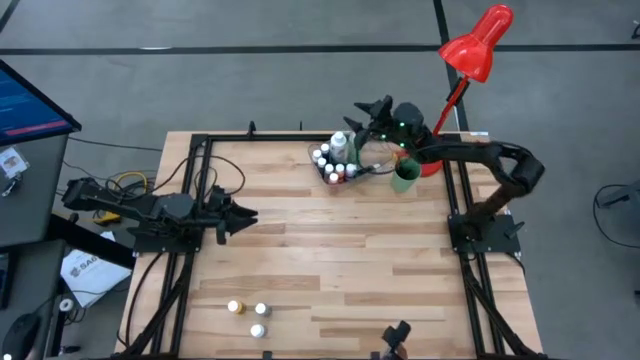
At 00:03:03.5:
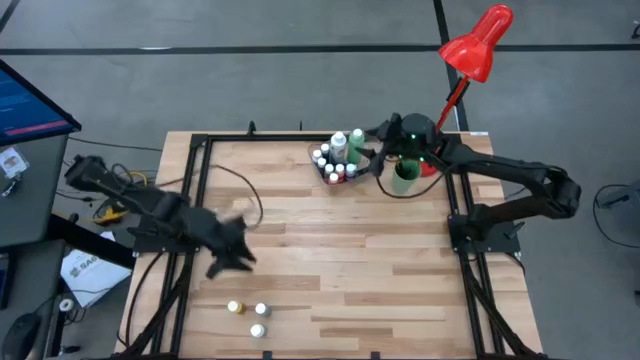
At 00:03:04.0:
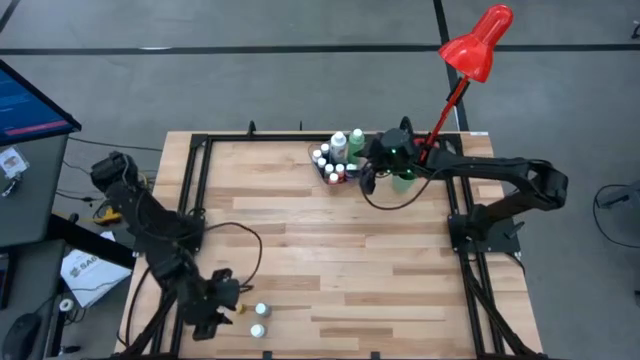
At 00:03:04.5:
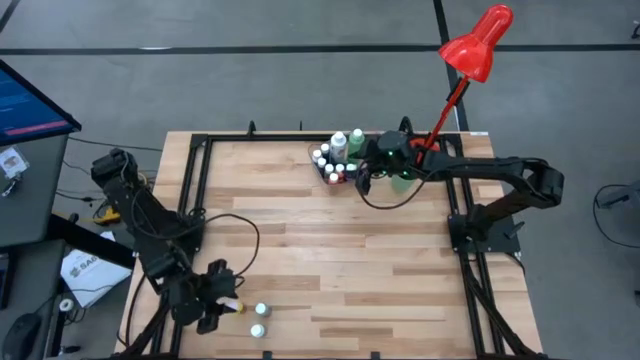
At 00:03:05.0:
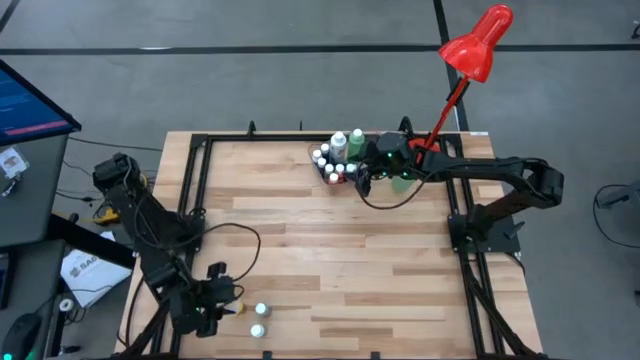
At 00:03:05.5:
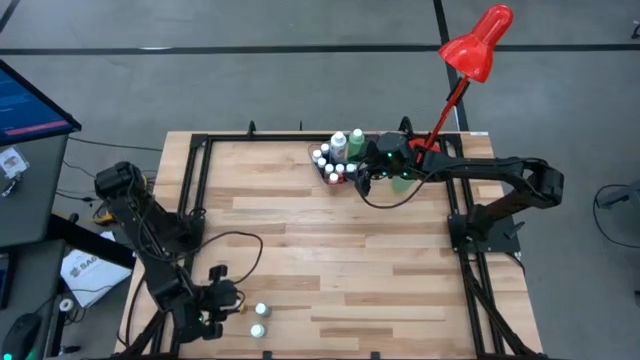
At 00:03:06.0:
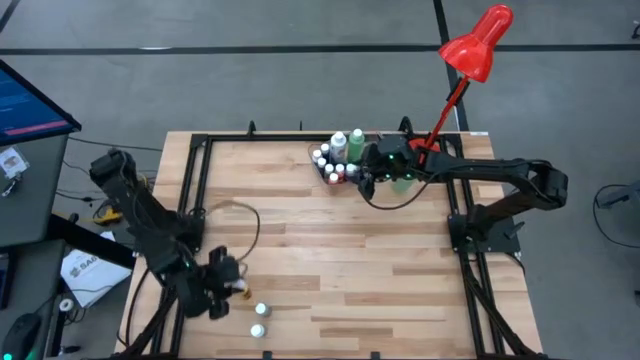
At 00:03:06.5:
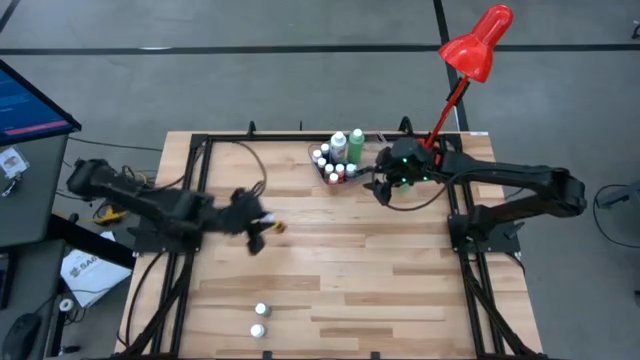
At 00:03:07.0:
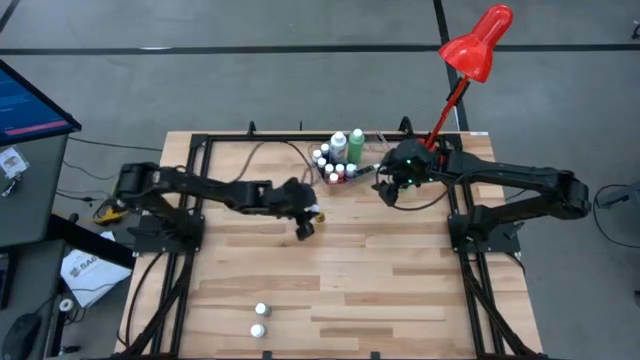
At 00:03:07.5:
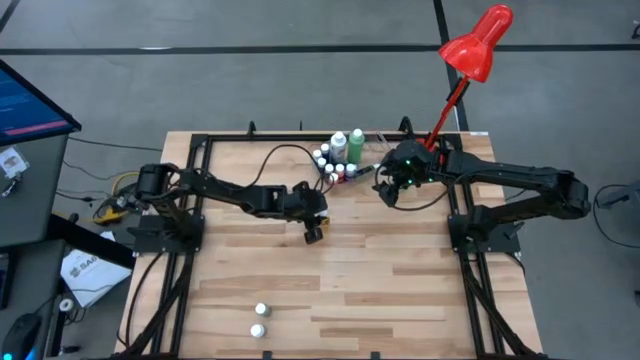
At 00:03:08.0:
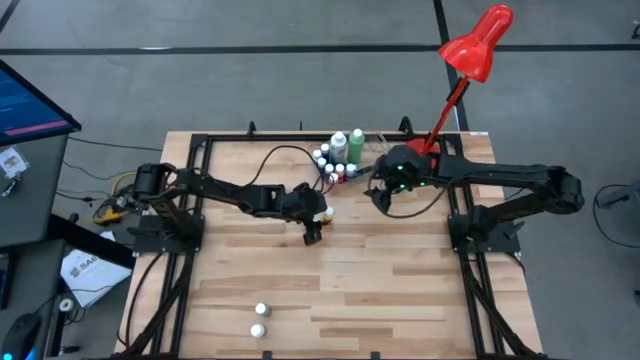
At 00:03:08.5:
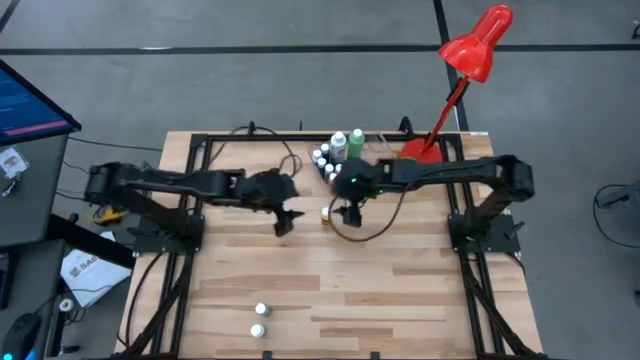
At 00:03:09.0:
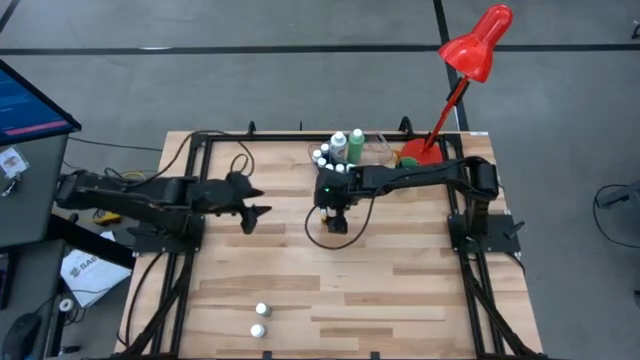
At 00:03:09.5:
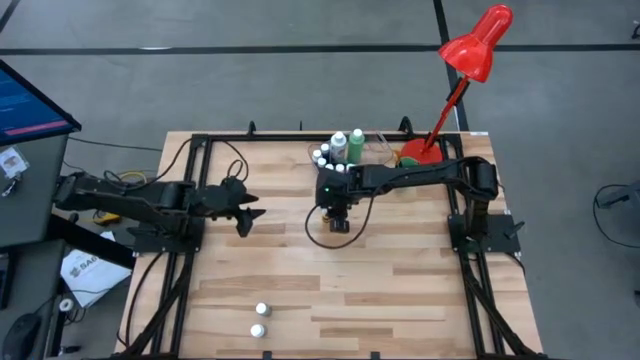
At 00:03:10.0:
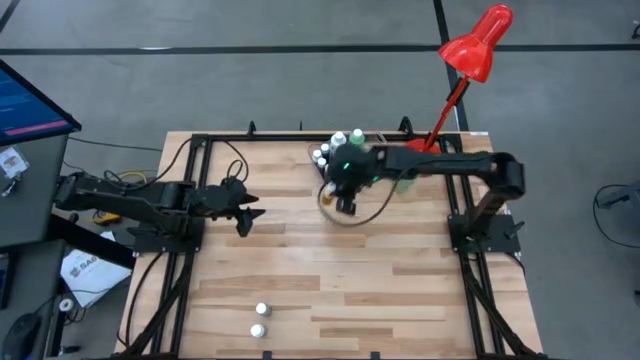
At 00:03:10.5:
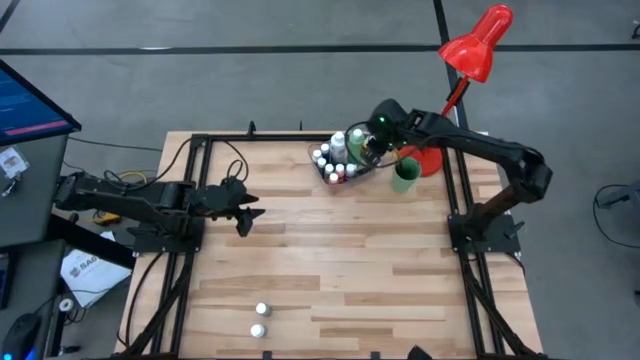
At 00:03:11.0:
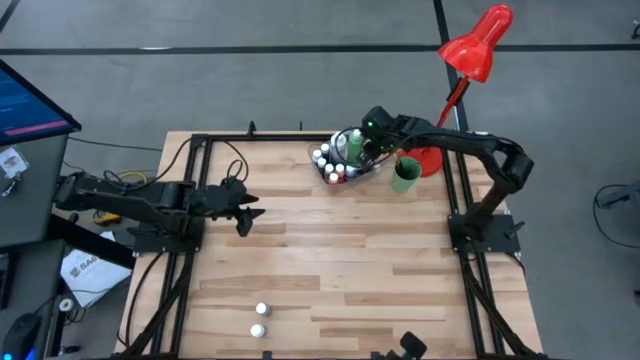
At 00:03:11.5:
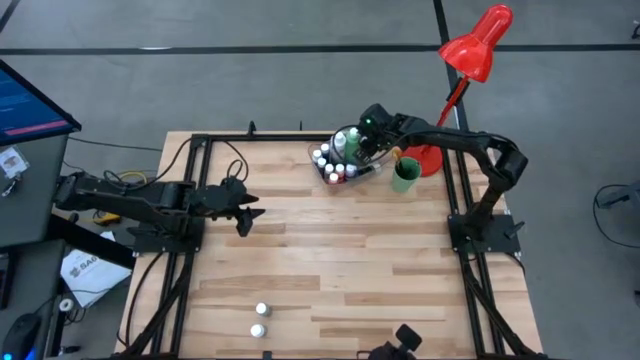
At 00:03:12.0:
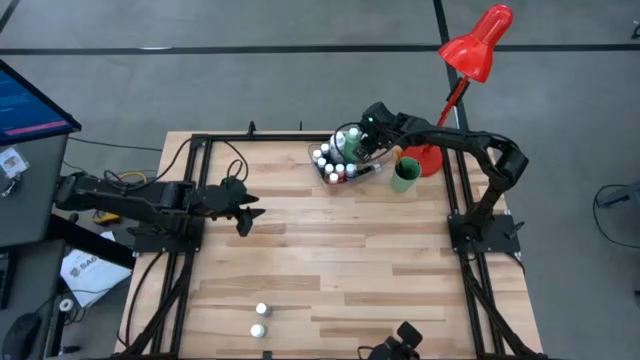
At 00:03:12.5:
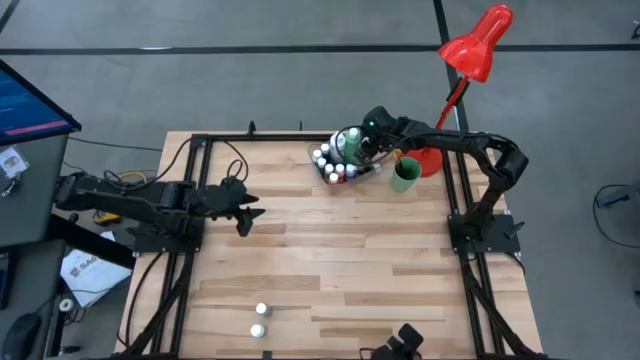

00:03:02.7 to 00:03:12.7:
Task: Pick & Place Paint Supplies
Put the small yellow paint bottle into the transparent bin

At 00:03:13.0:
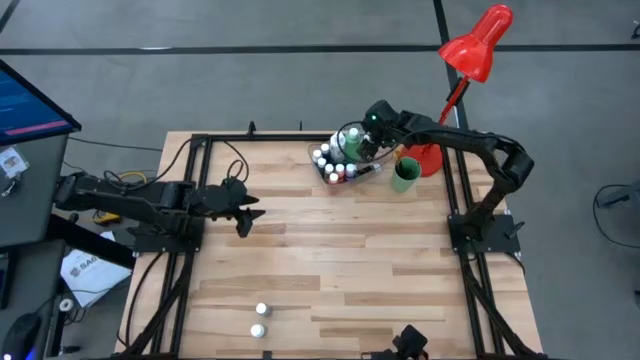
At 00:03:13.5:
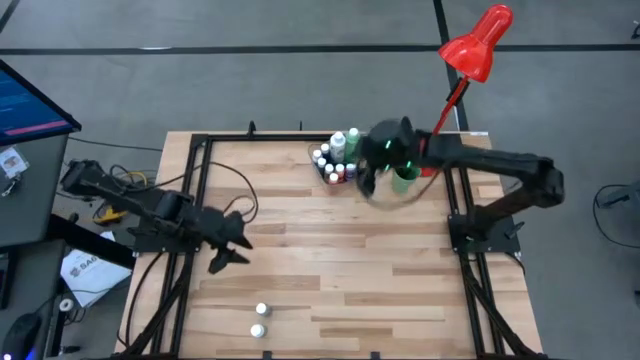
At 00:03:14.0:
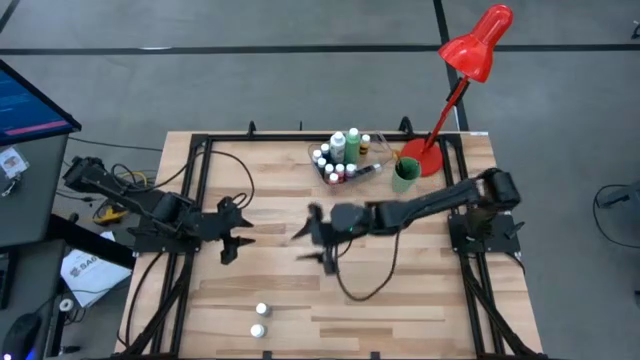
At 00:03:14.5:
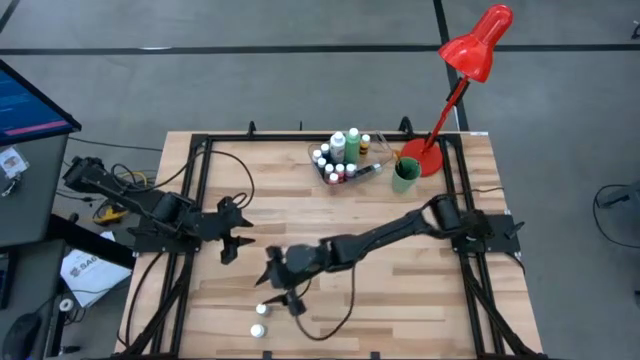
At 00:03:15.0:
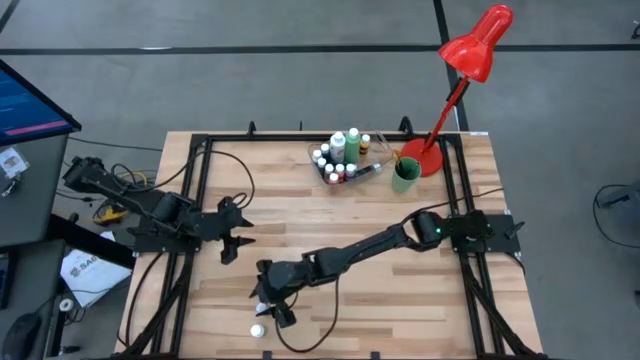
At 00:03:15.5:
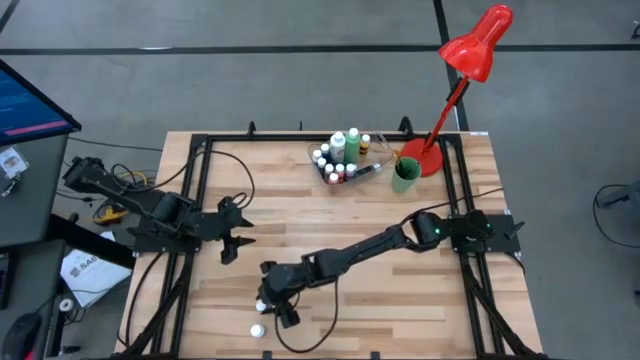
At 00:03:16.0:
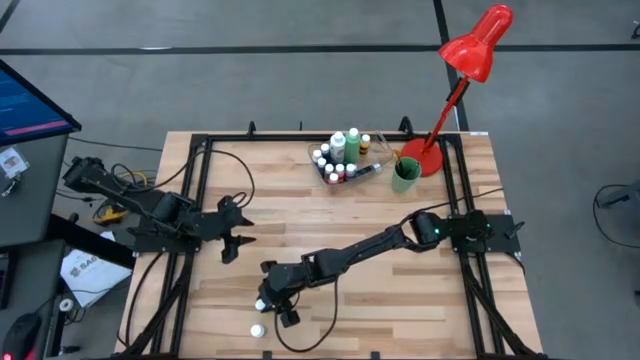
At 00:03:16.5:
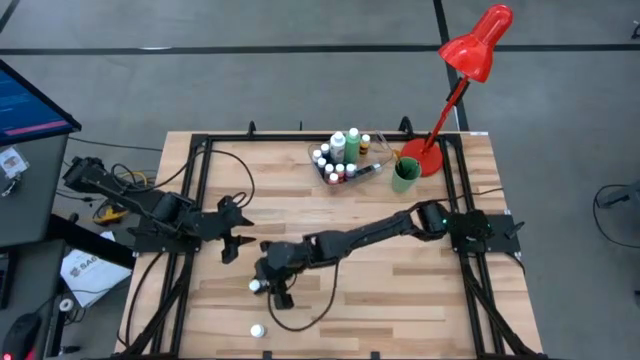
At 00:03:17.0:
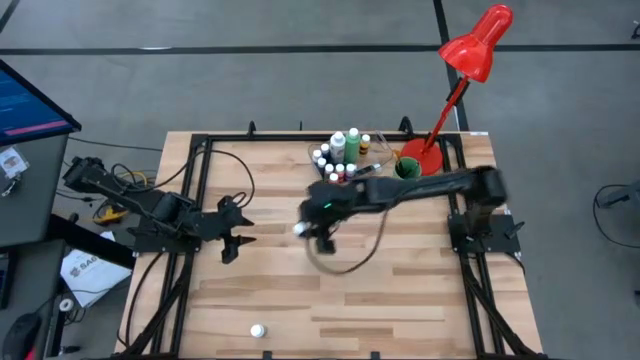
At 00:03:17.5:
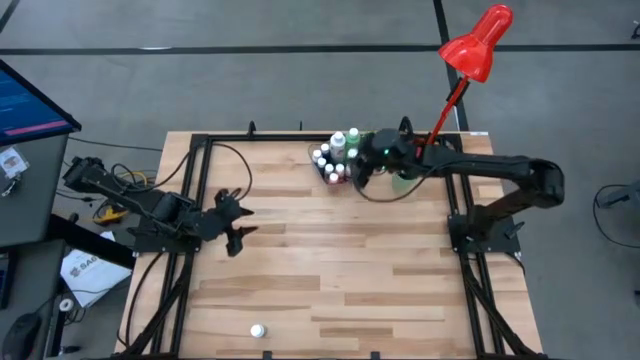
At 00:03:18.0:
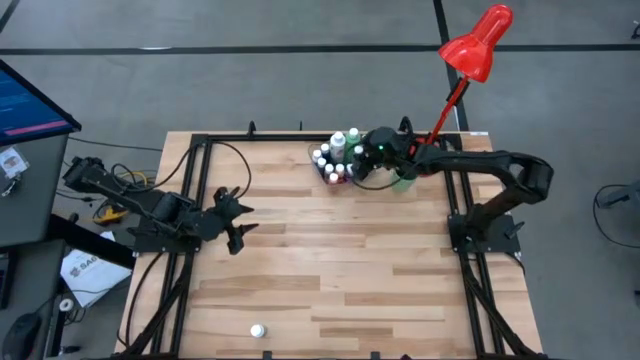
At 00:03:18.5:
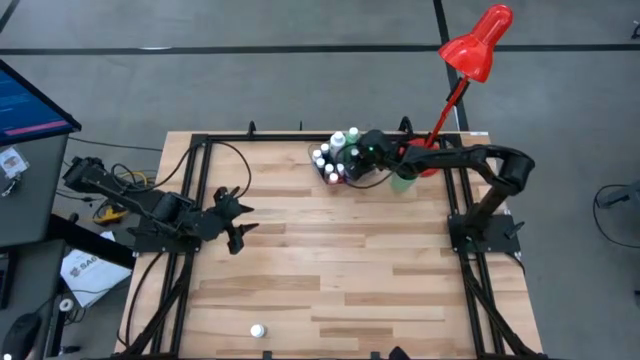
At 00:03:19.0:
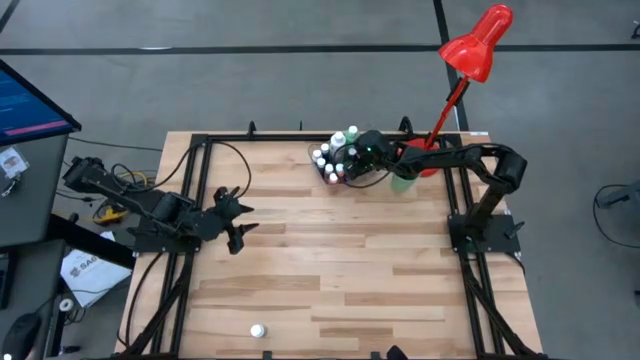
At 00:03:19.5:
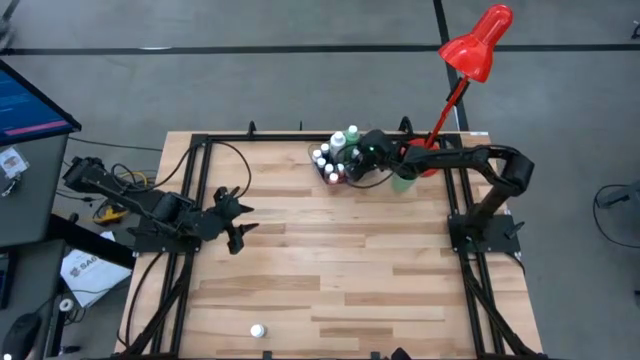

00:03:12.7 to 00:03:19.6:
Put the small gray paint bottle into the transparent bin

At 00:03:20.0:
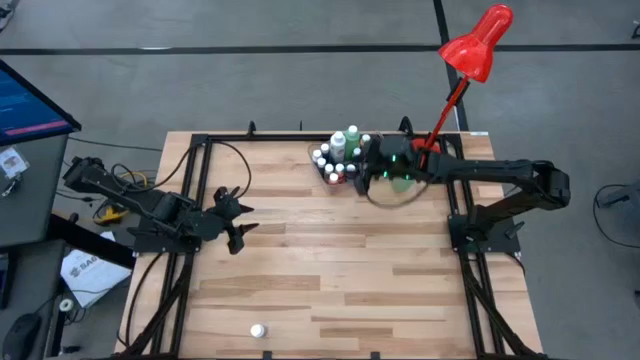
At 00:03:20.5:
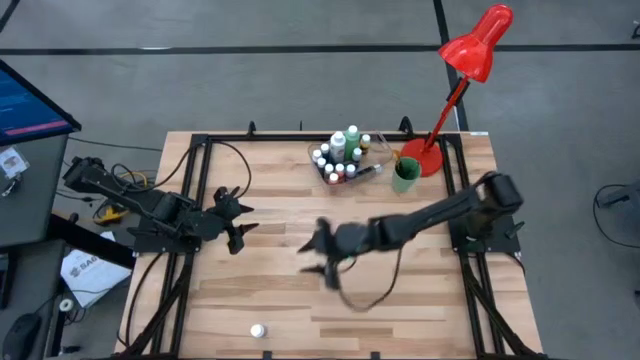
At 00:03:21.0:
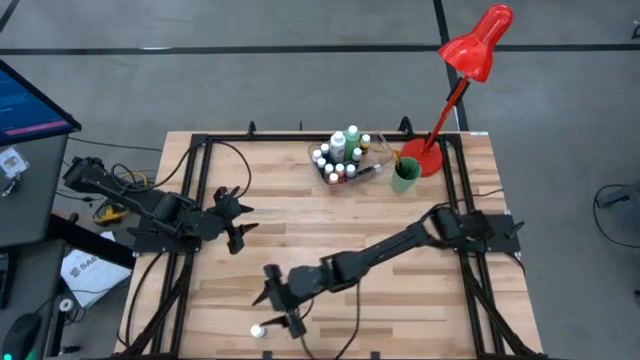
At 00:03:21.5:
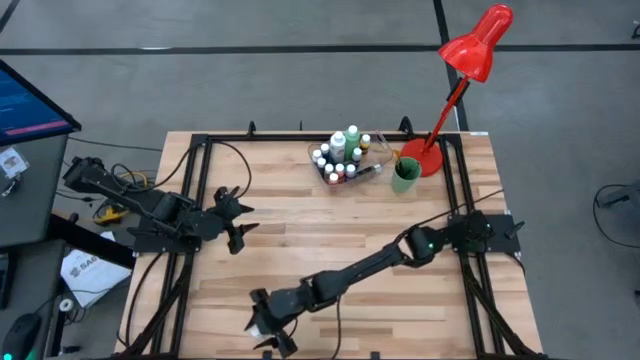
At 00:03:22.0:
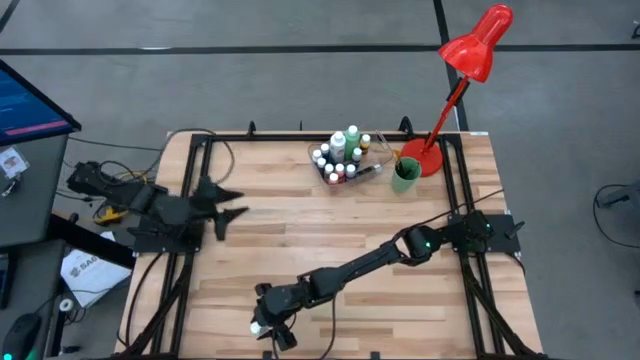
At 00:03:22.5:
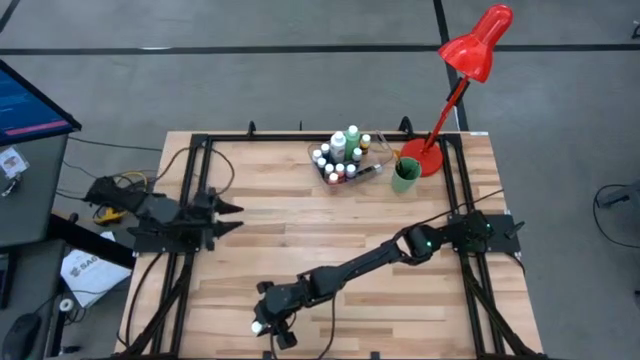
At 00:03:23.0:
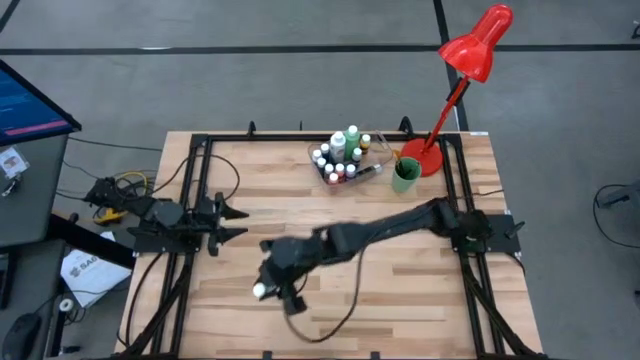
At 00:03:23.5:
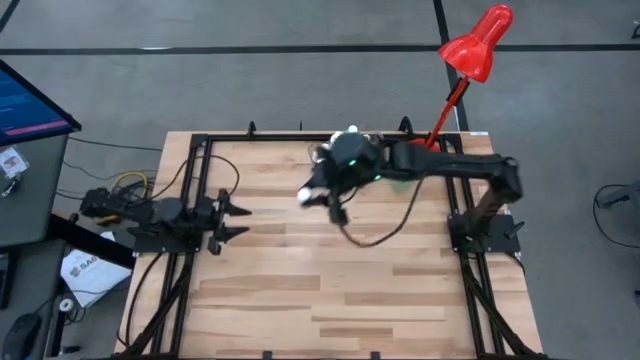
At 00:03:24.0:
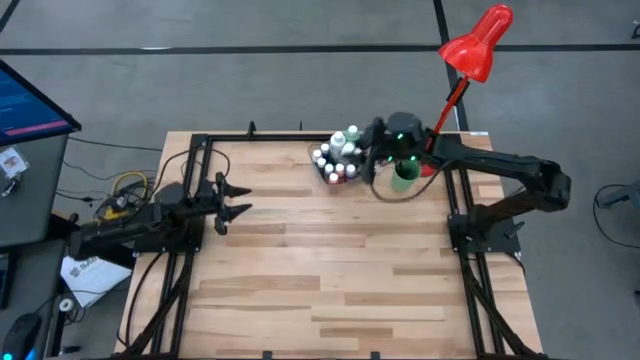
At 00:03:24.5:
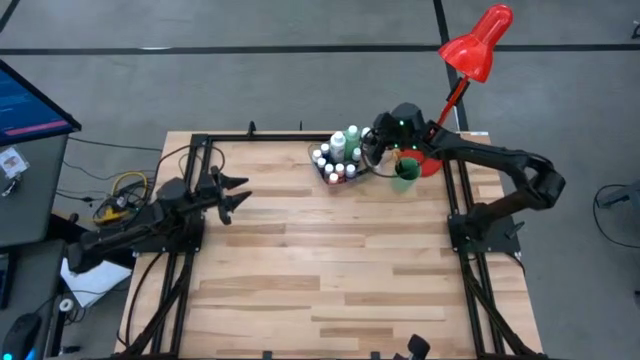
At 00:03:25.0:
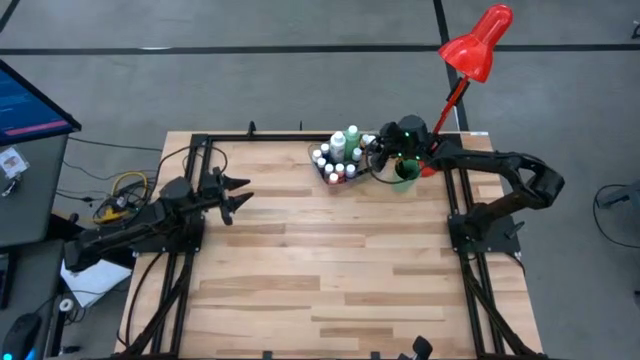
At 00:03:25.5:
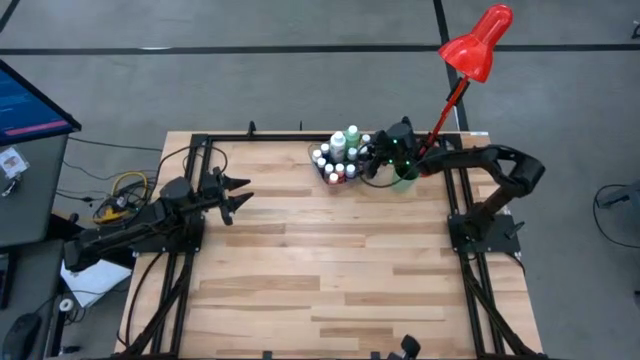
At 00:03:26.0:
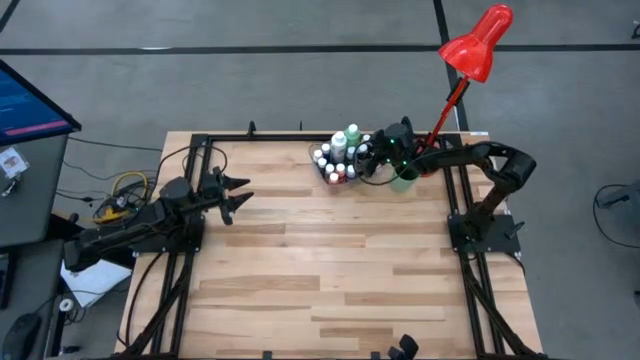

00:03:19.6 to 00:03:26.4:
Put the small white paint bottle into the transparent bin
